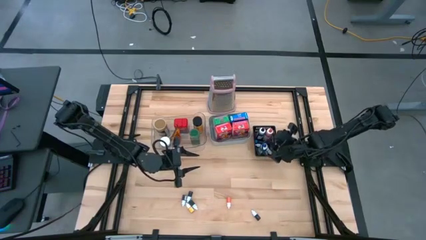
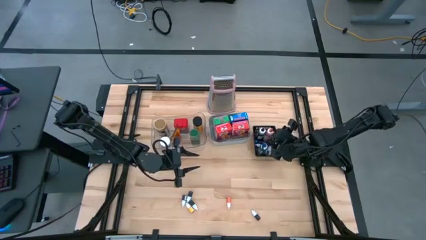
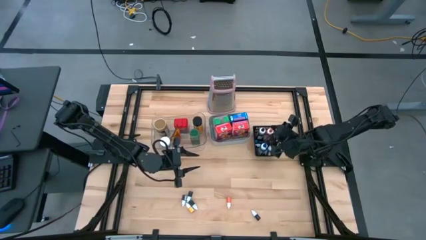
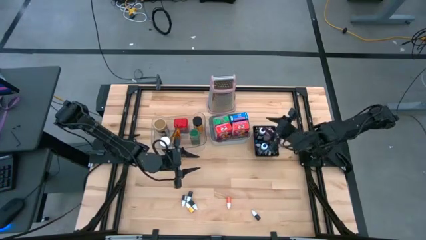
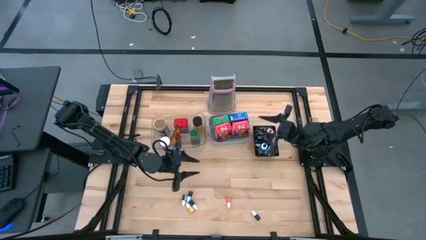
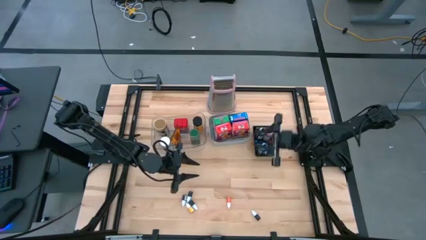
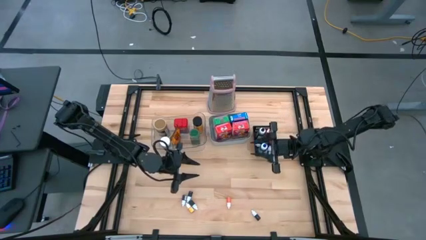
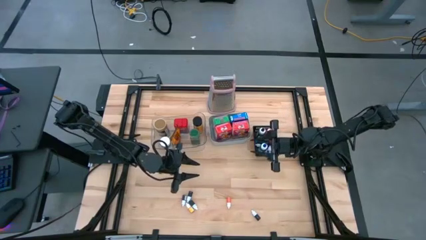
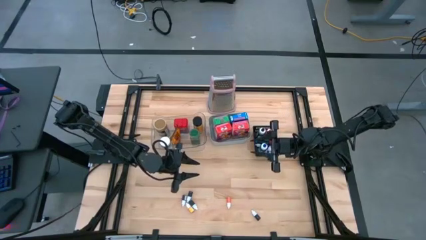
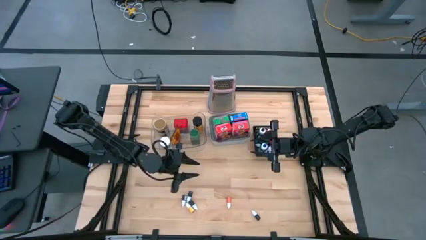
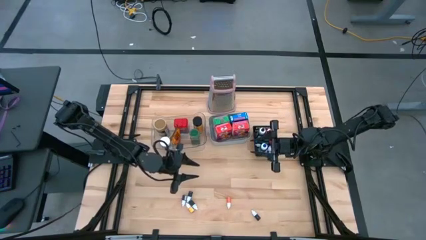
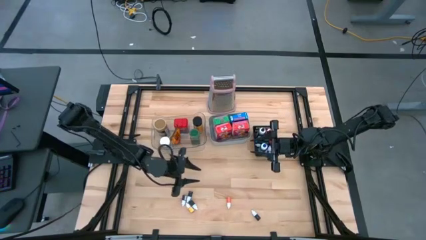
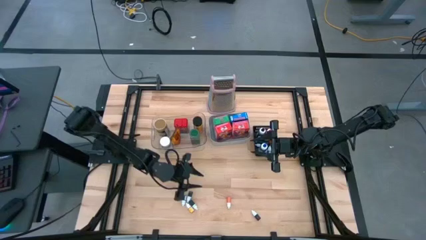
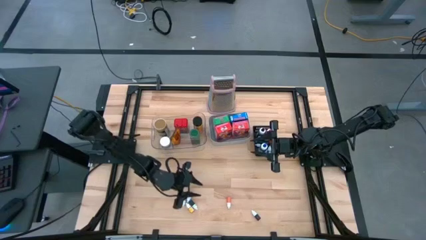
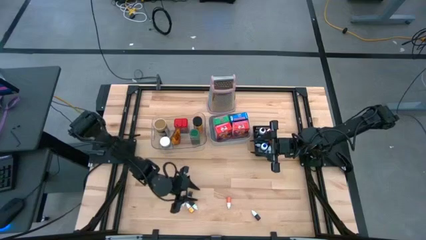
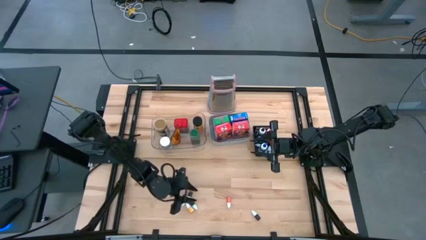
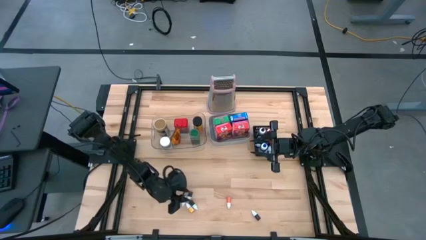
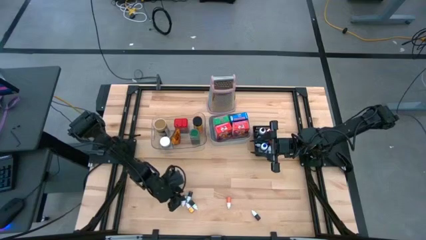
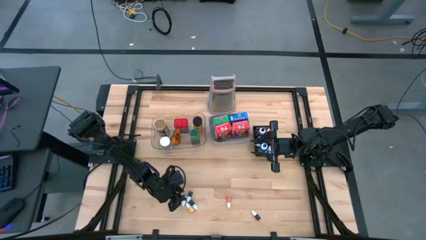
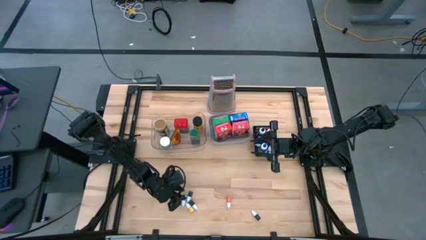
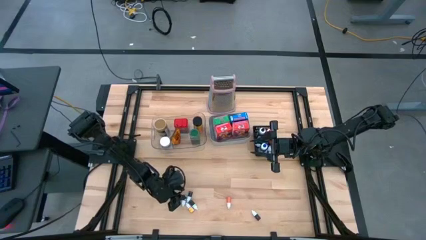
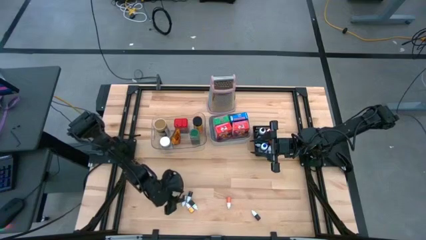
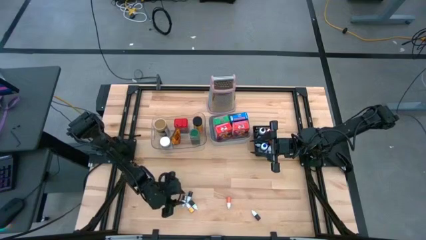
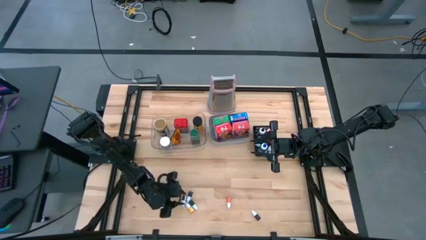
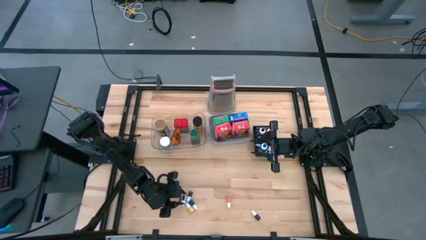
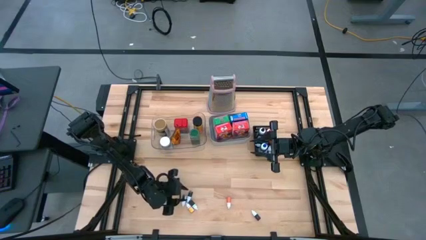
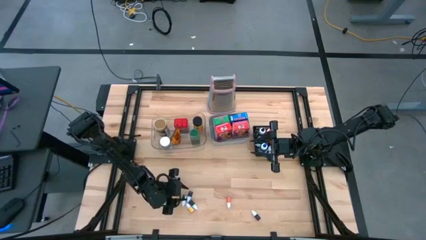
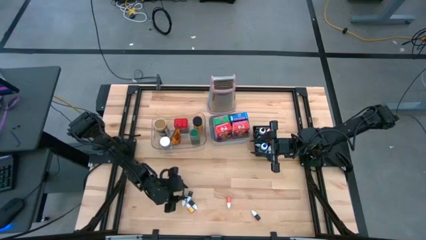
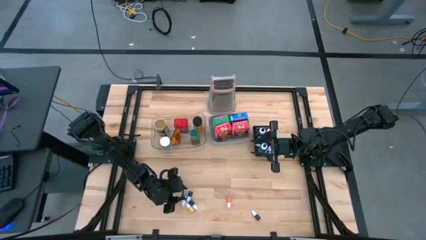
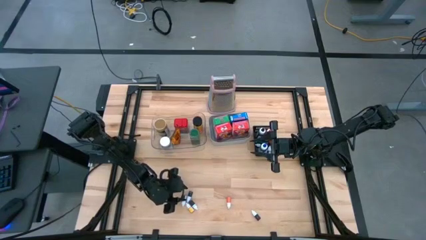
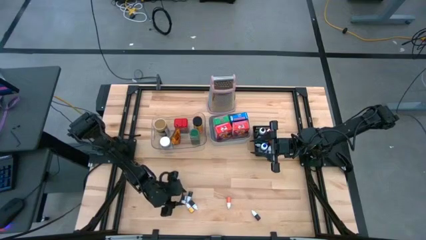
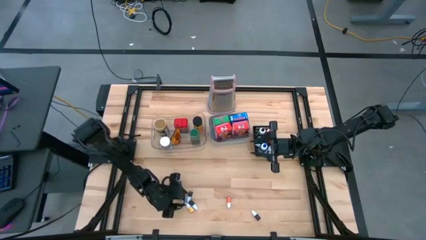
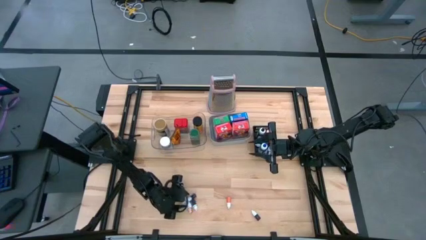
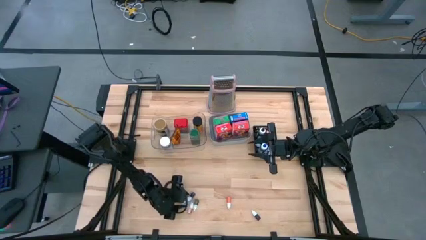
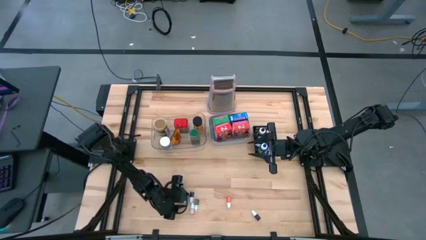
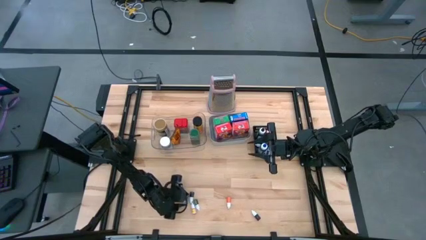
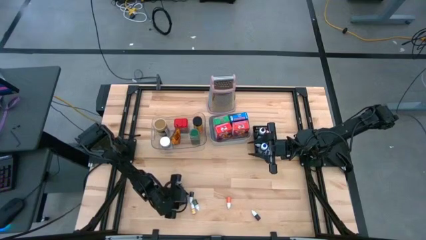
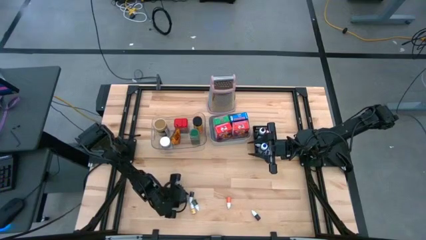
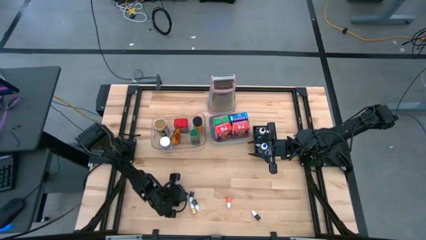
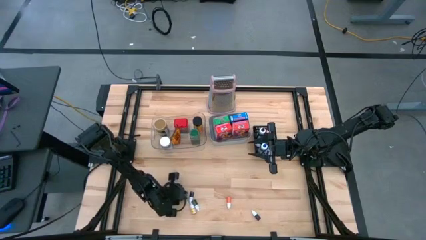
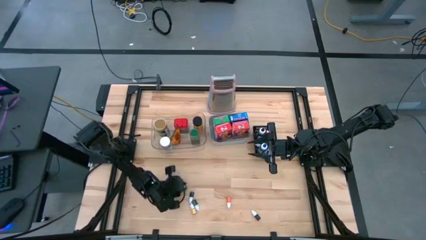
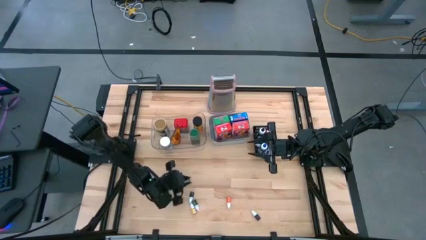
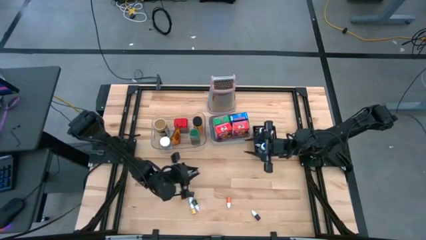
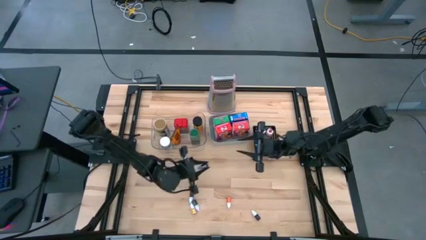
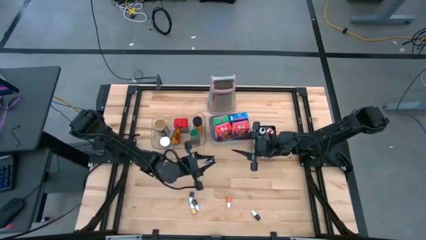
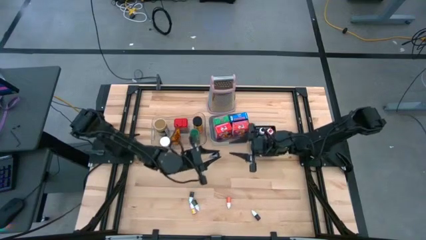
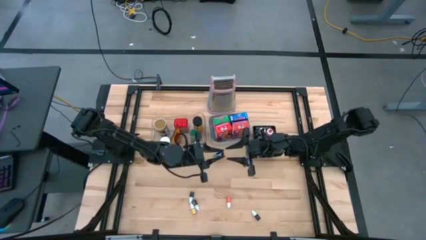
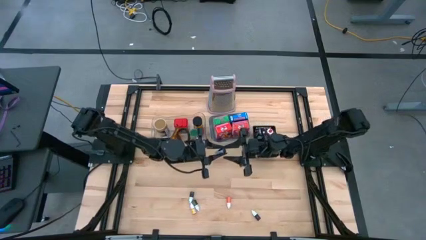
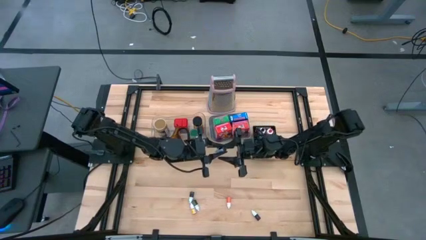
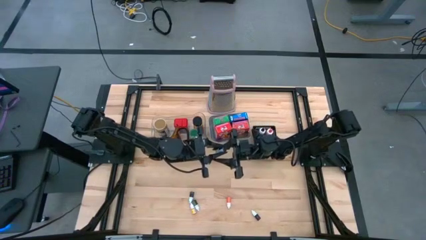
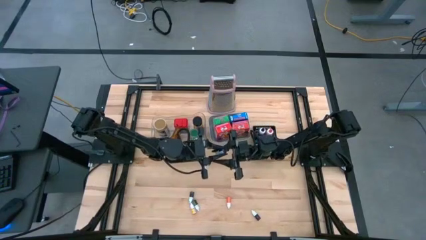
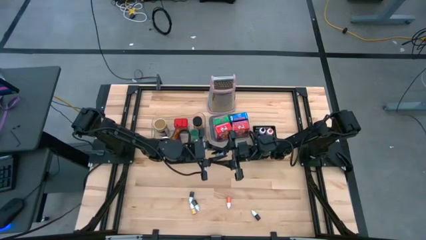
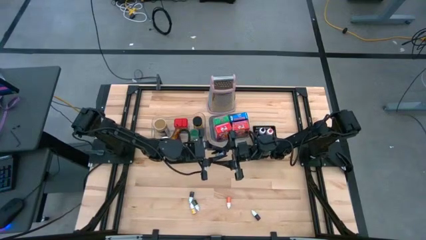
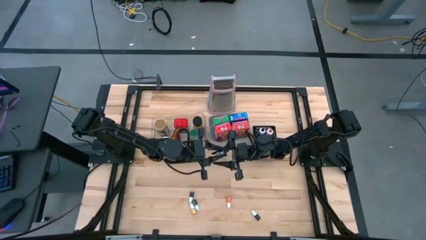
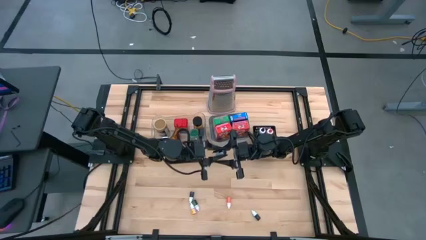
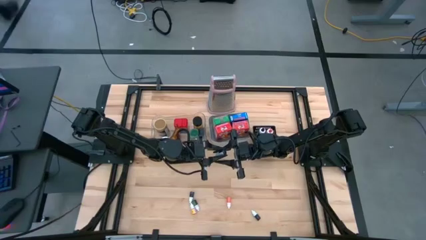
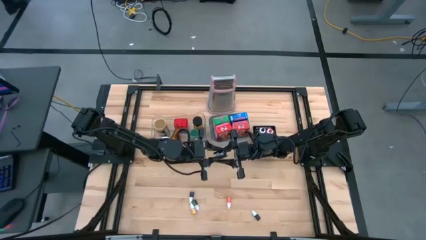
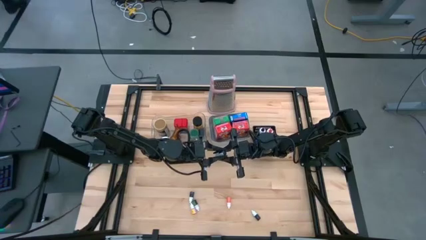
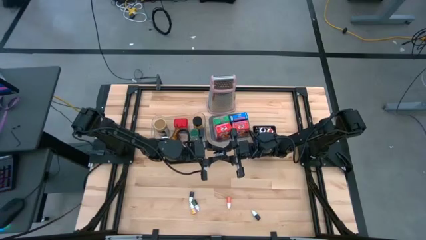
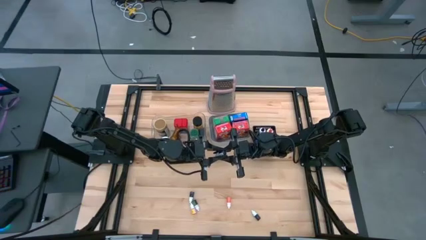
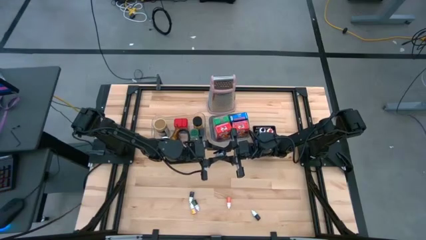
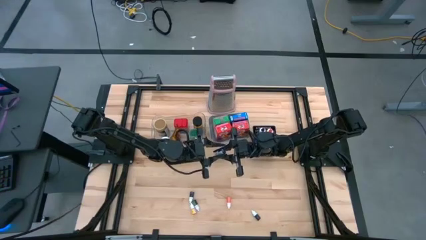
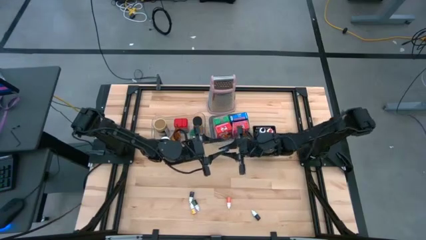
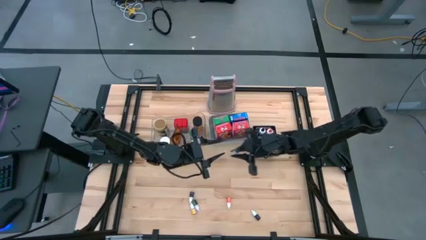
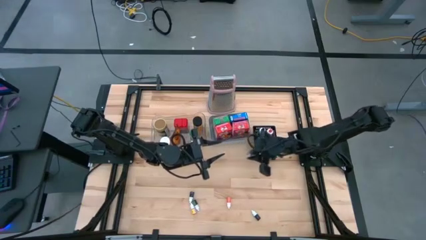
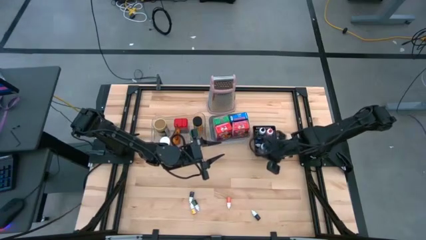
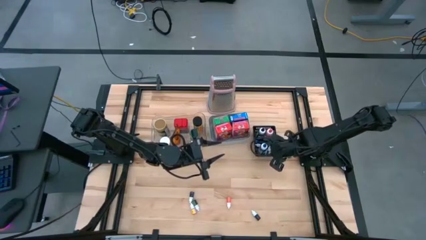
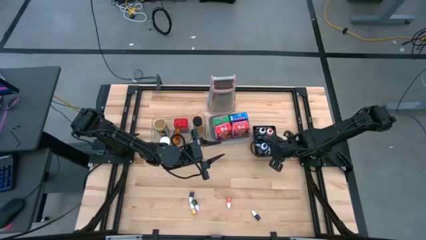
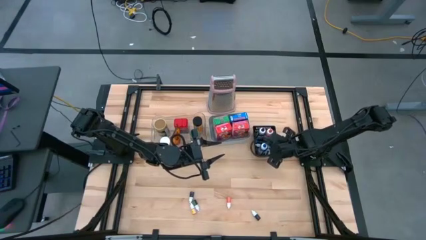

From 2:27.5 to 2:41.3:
Task: Pick & Place Kitchen Items
Put the left small violet food coloring bottle into the black basket

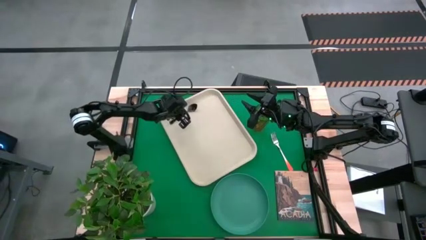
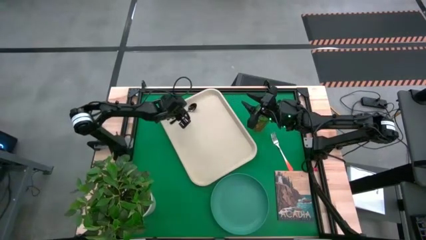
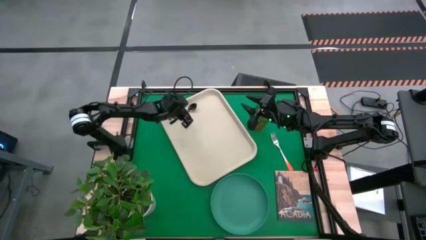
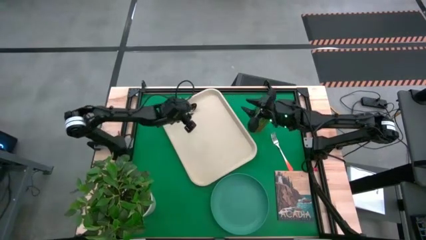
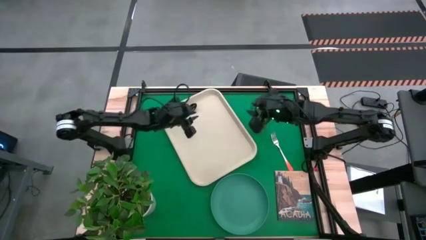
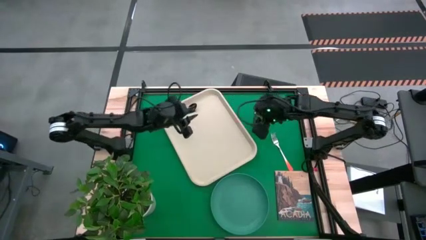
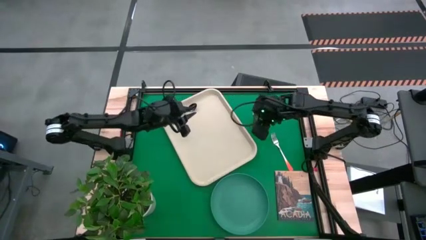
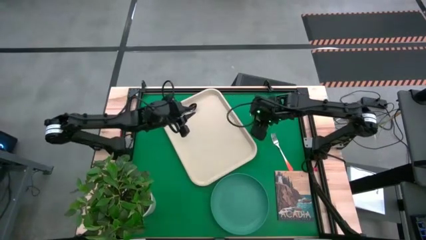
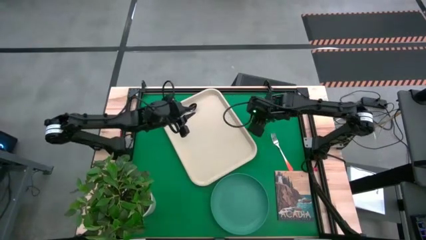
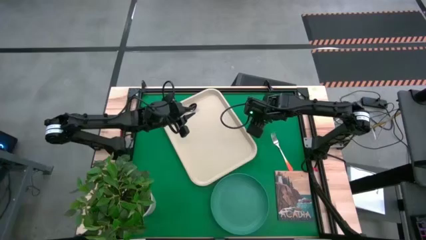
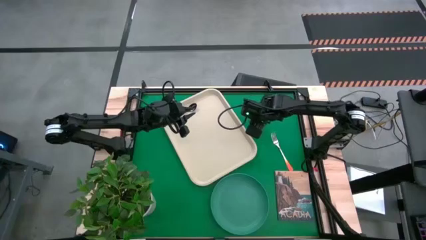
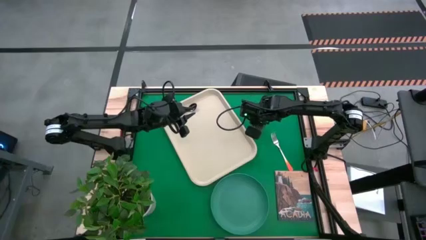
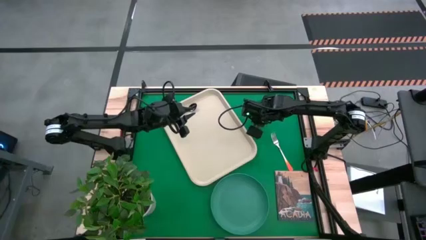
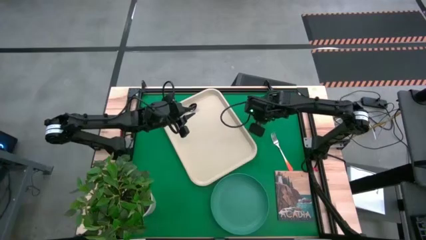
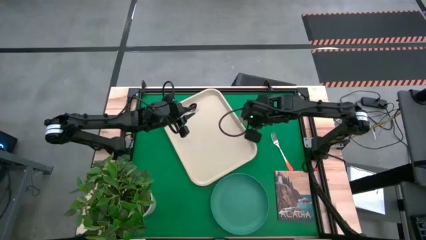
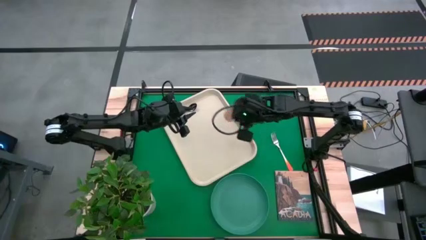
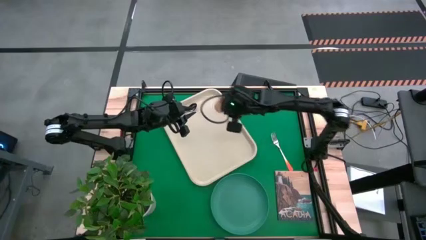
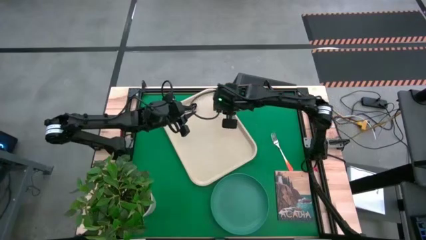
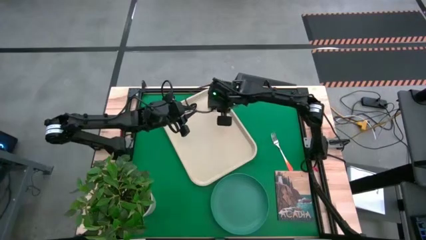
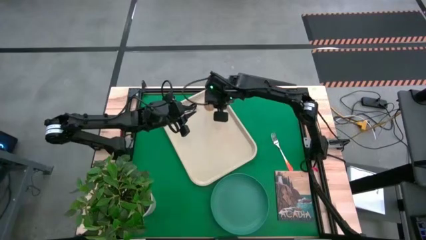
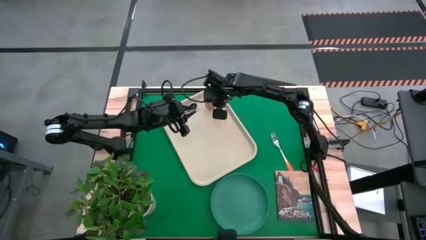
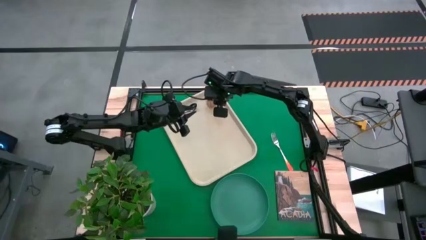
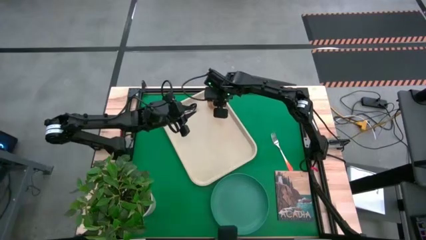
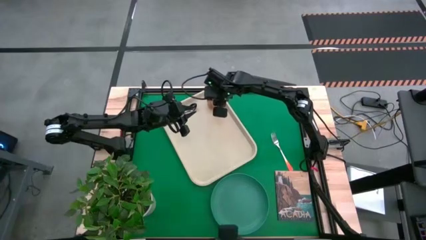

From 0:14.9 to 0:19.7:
Task: Pick and place plate/cup/fork/spoon on tray
Put the yellow glass on the top right of the white tray
